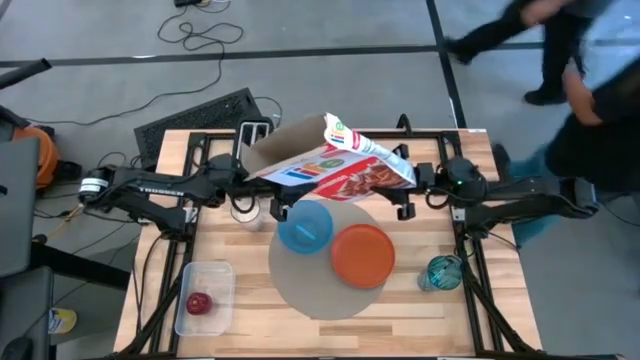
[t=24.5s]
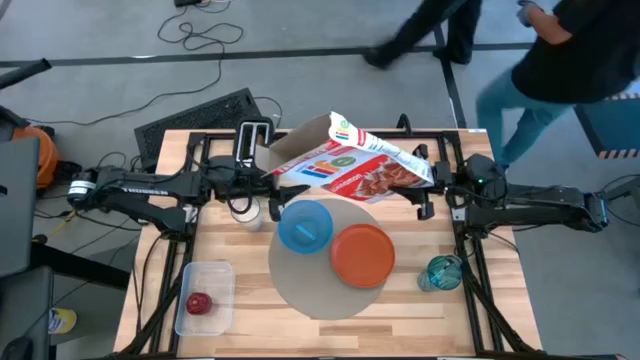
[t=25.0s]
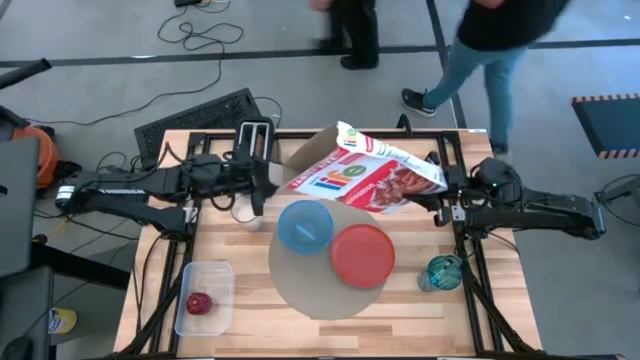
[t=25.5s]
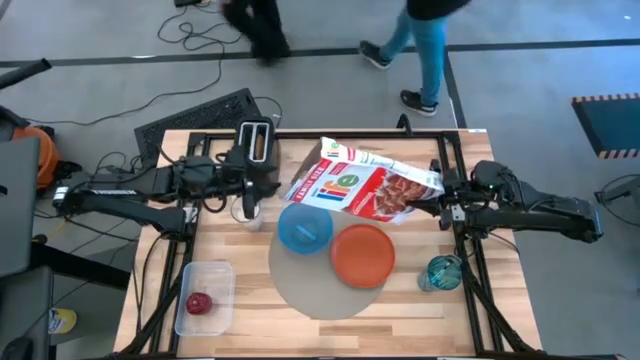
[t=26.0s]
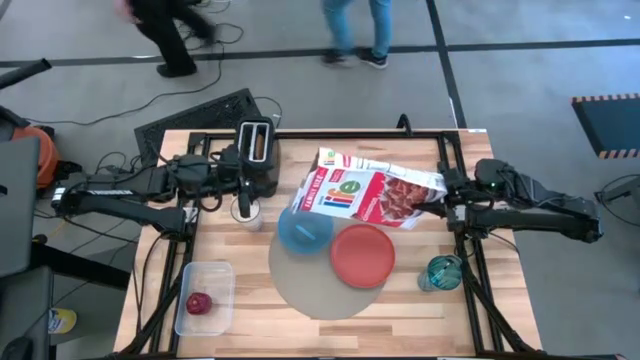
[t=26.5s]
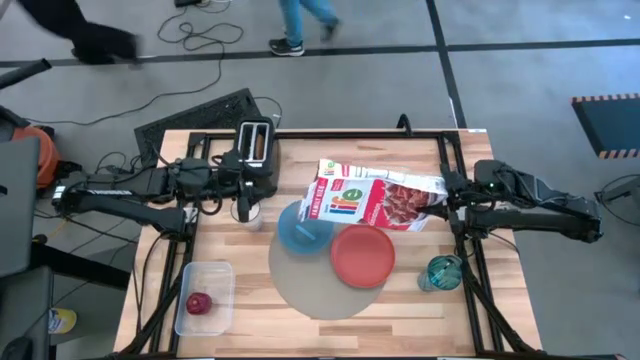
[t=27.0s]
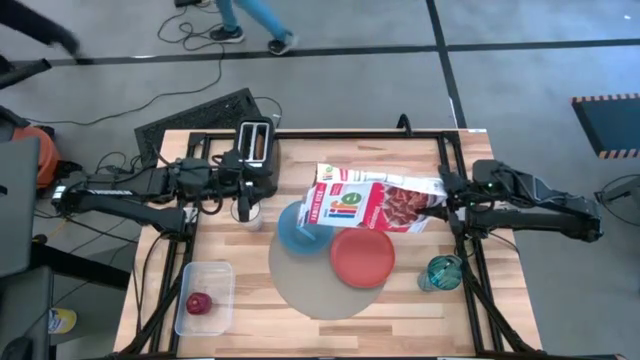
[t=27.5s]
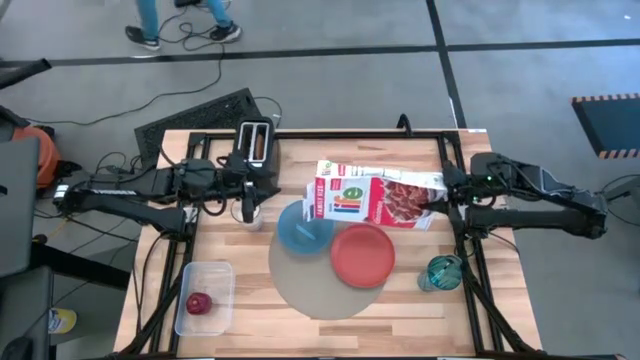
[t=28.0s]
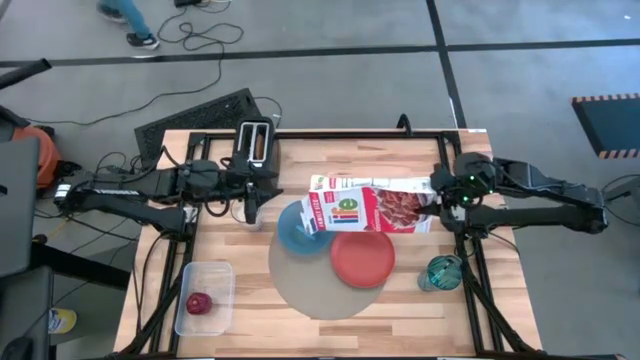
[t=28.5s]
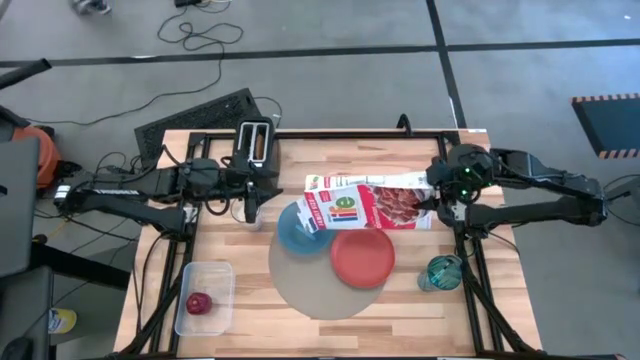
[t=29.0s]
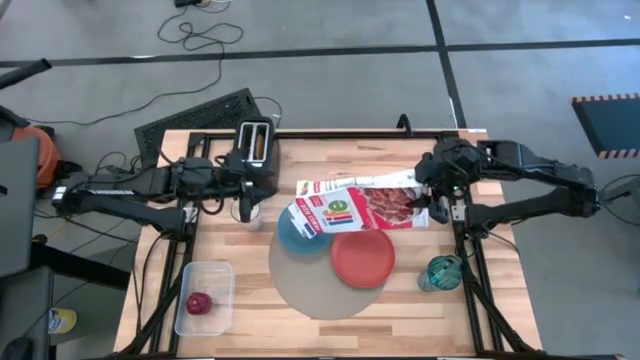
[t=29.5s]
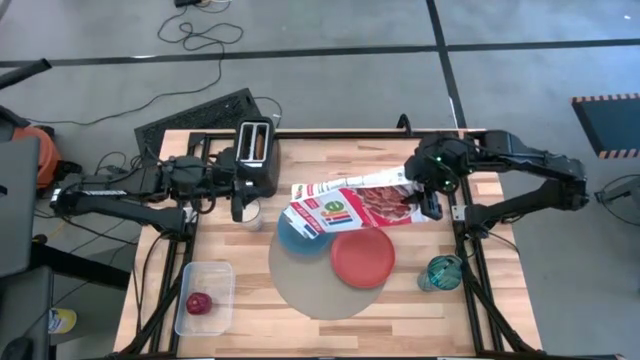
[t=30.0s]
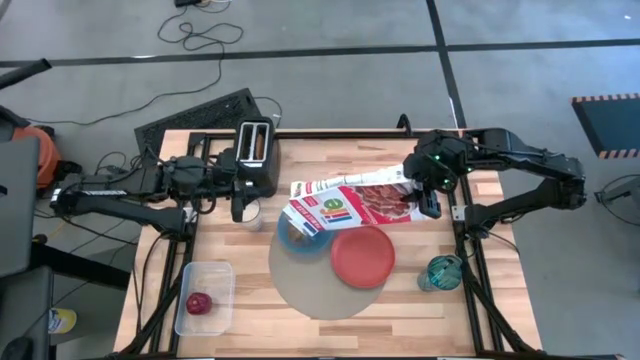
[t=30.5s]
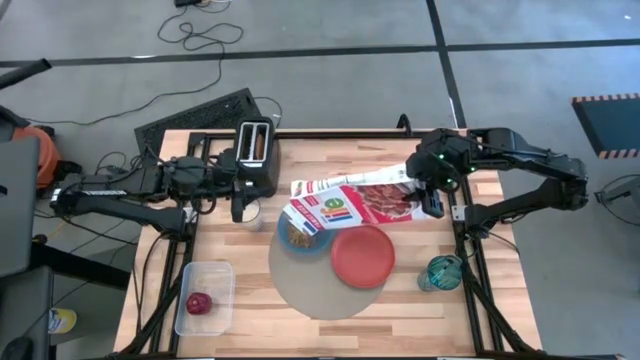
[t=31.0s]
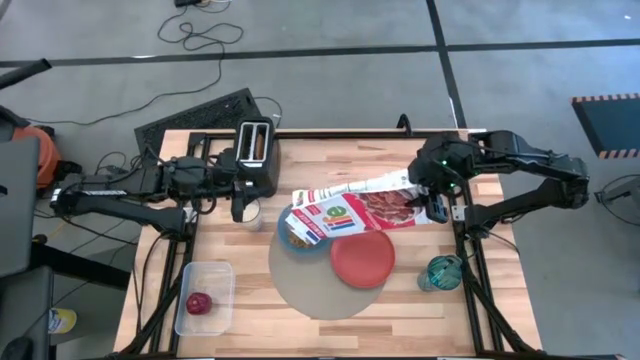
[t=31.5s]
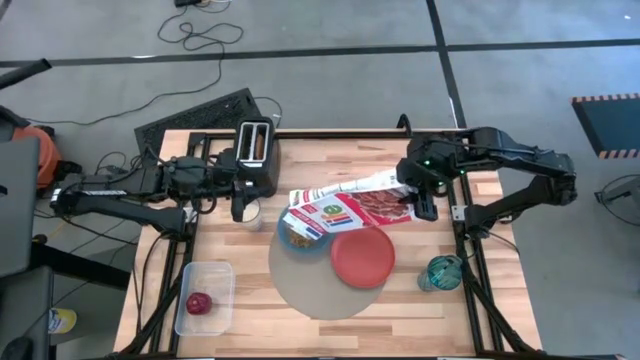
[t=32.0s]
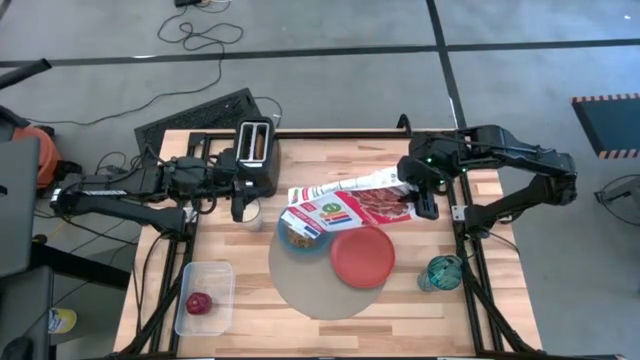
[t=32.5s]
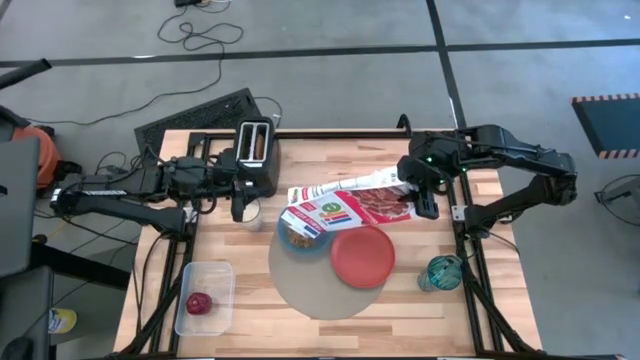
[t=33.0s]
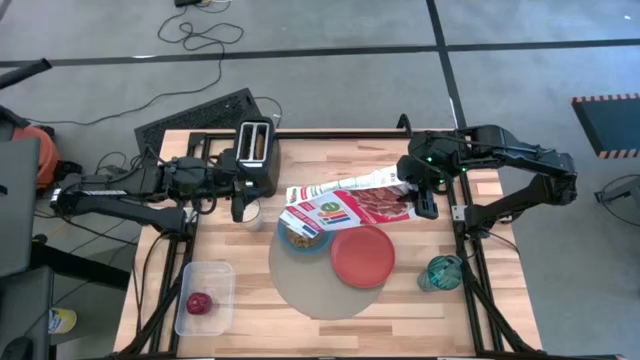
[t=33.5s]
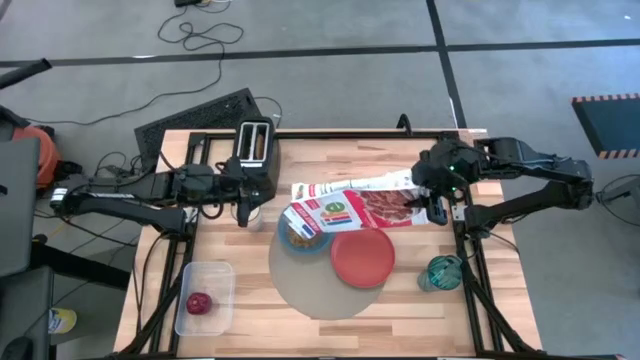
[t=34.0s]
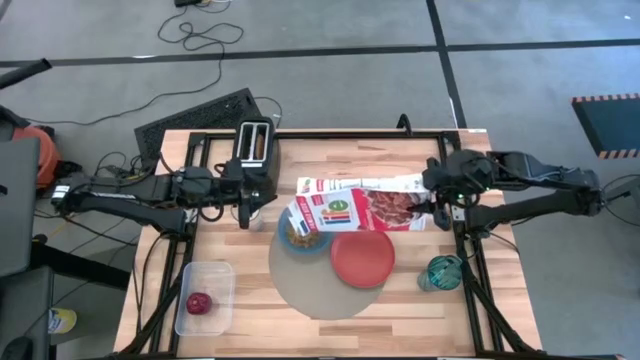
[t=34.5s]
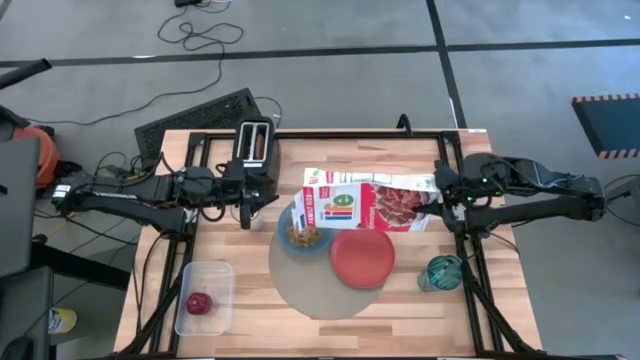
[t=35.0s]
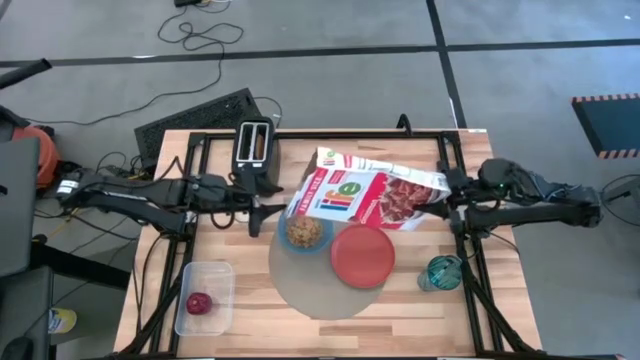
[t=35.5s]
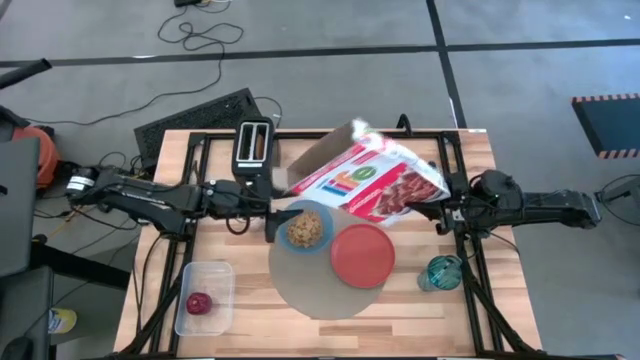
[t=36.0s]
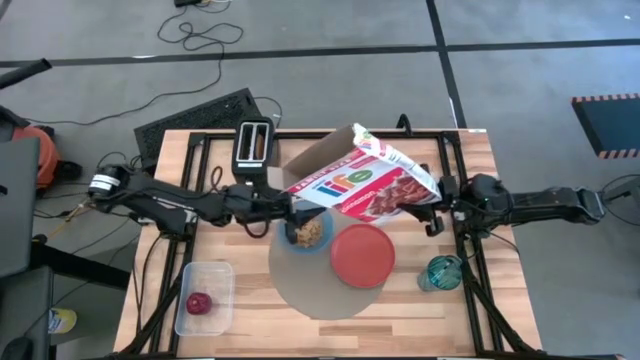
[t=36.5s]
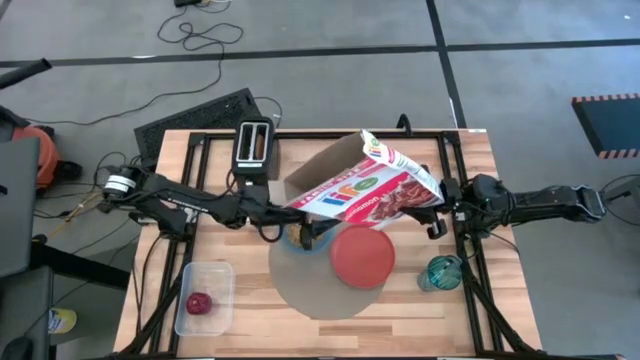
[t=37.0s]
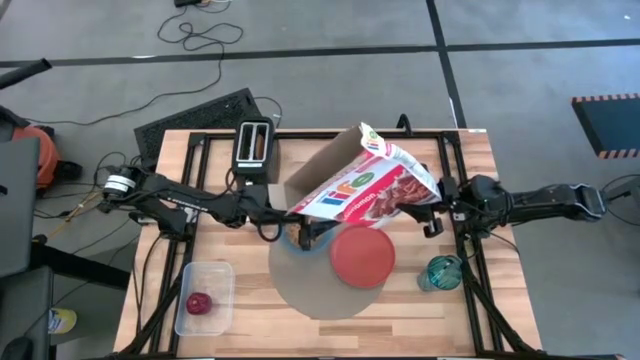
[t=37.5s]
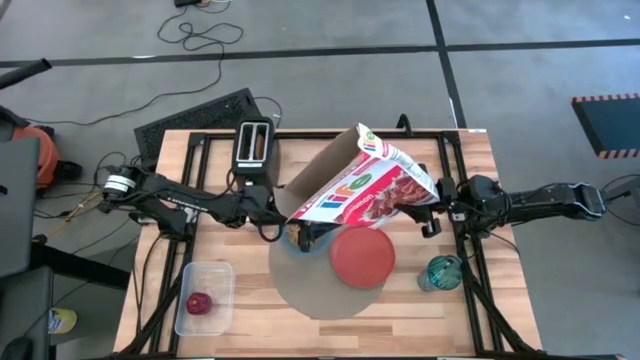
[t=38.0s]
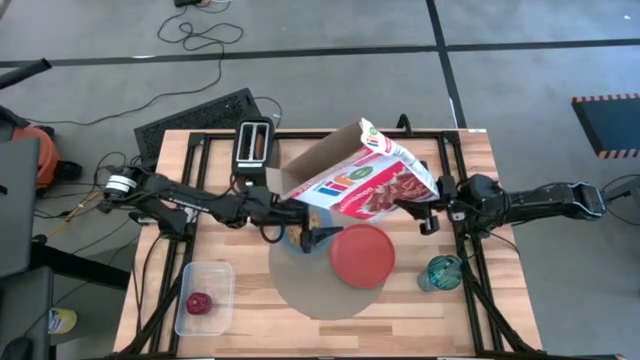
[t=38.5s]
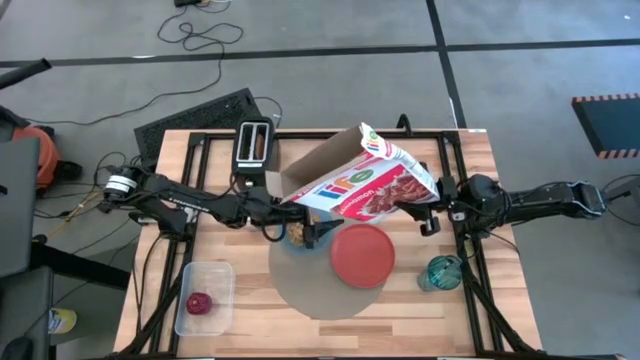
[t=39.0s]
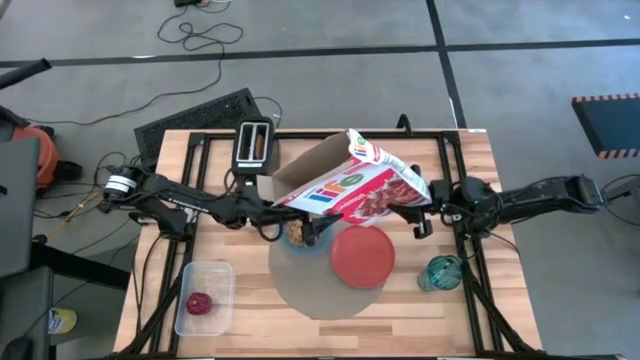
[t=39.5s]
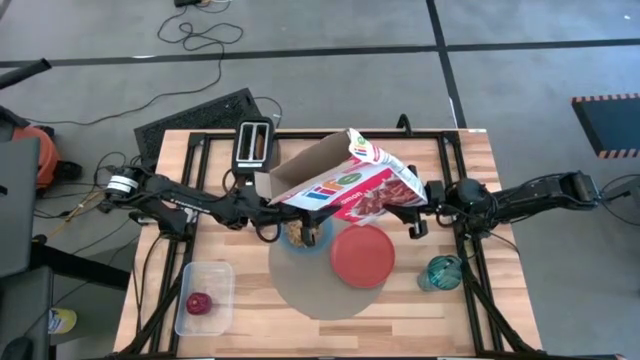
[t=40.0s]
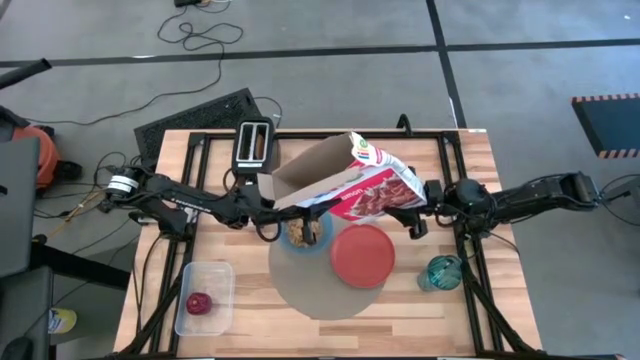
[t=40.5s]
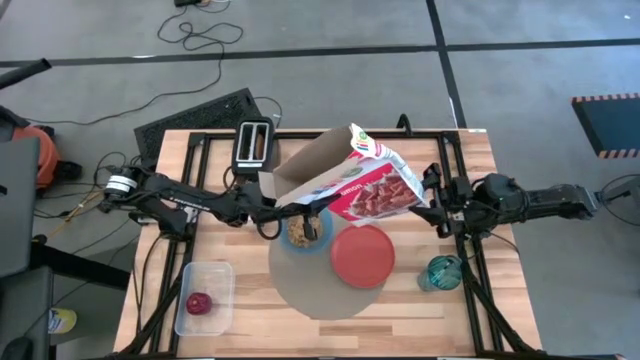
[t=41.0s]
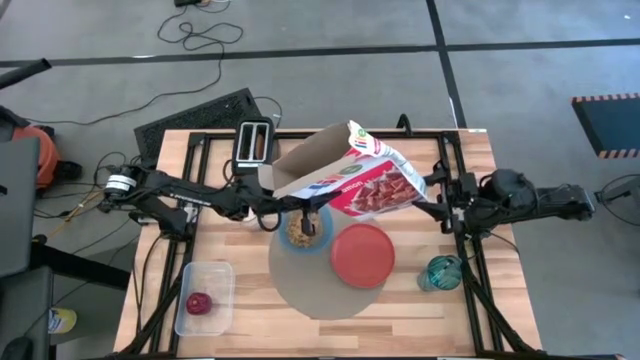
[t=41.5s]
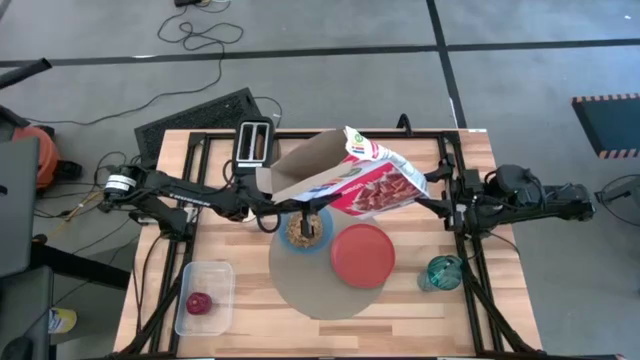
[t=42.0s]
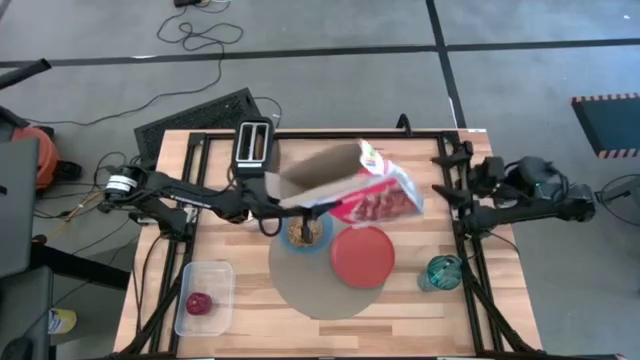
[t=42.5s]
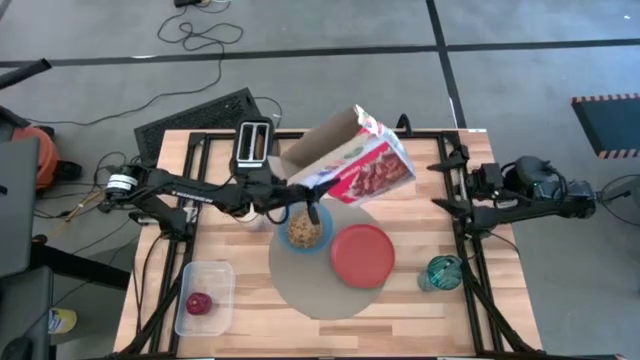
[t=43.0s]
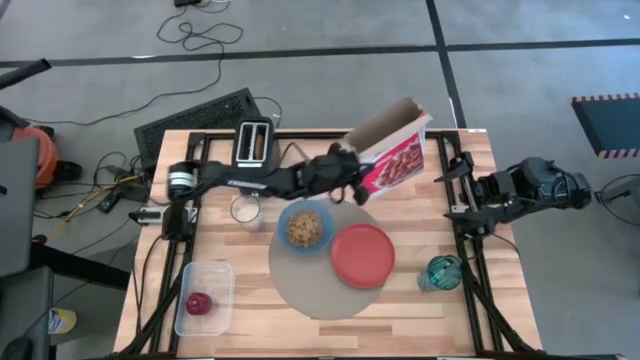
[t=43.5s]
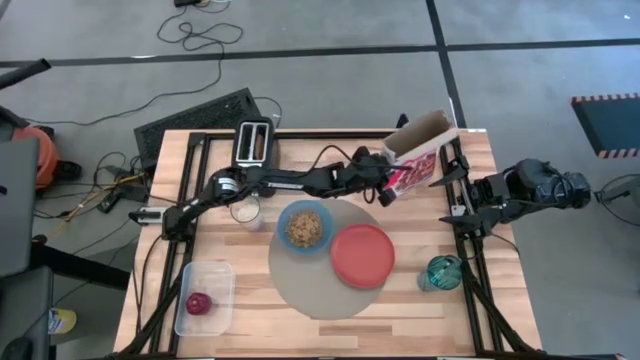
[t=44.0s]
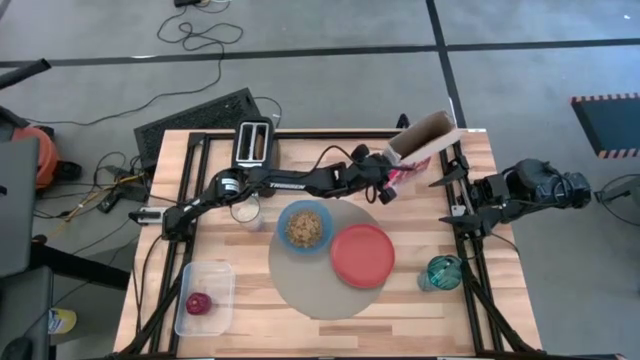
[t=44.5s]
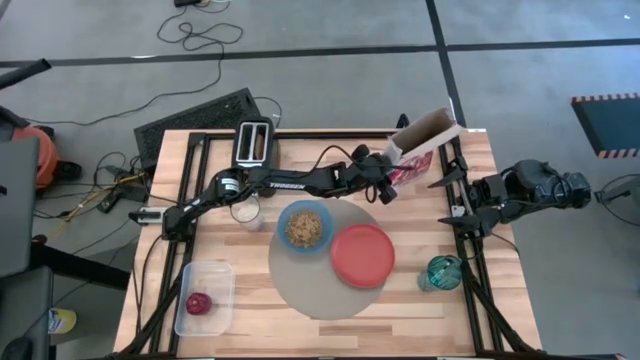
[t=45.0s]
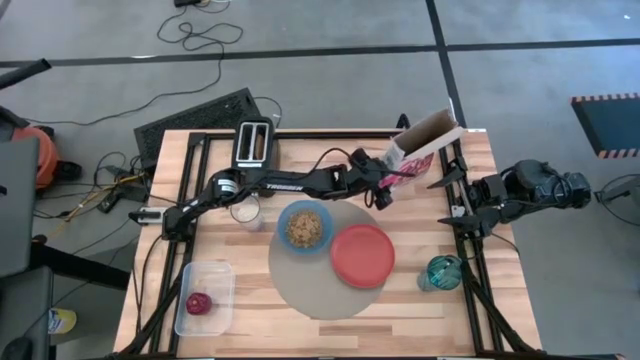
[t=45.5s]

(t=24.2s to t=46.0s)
Task: Arrange a breakfast setting
Pour the cereal into the blue bowl
